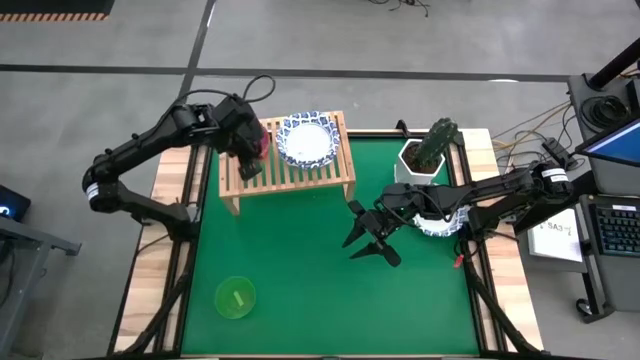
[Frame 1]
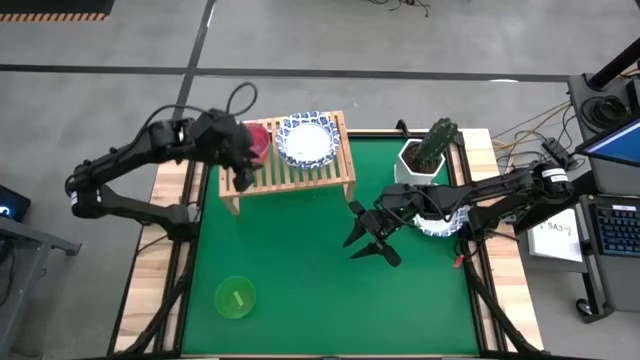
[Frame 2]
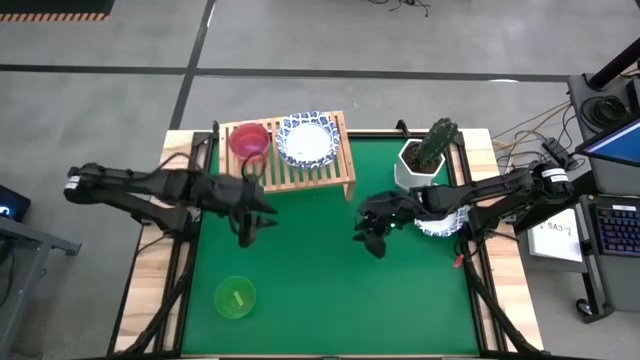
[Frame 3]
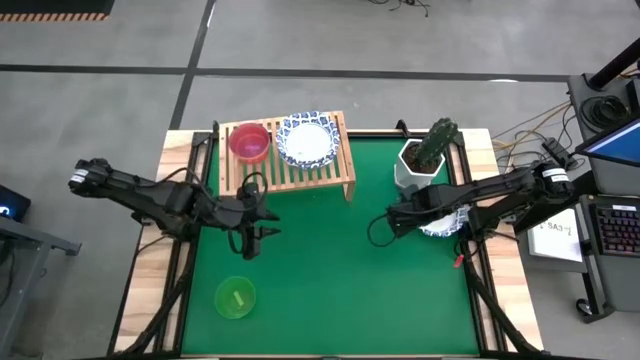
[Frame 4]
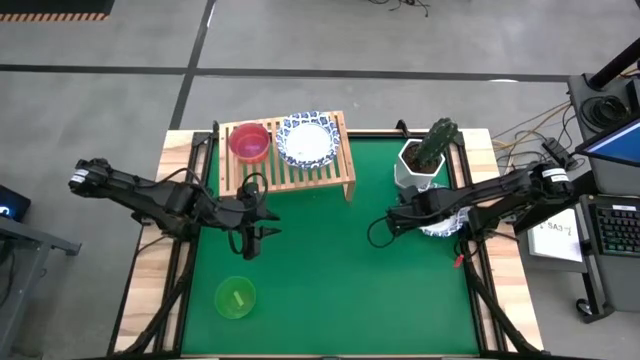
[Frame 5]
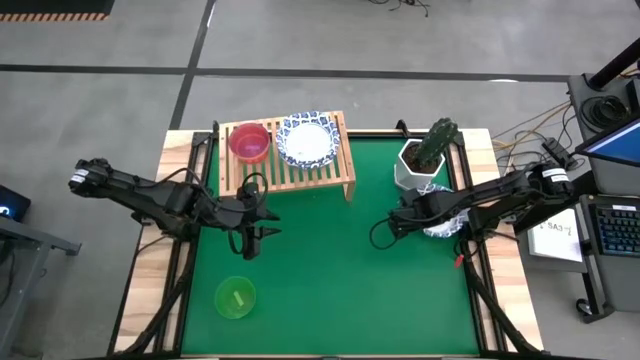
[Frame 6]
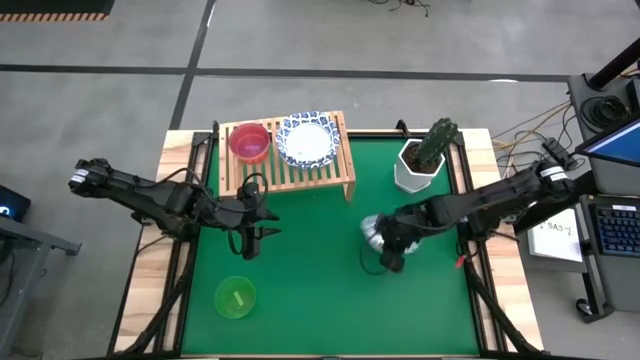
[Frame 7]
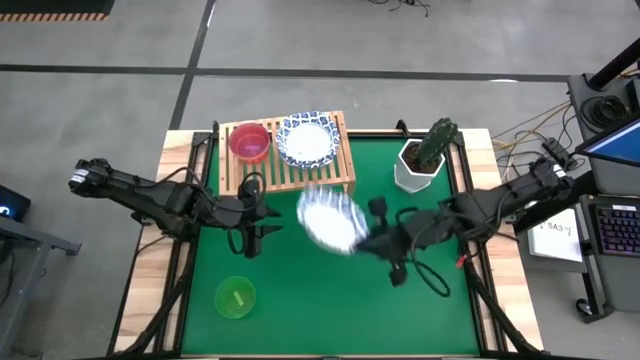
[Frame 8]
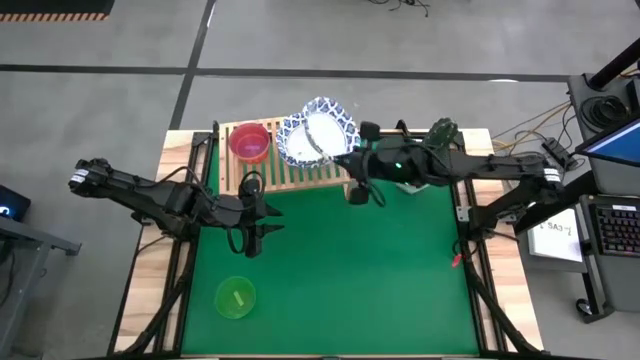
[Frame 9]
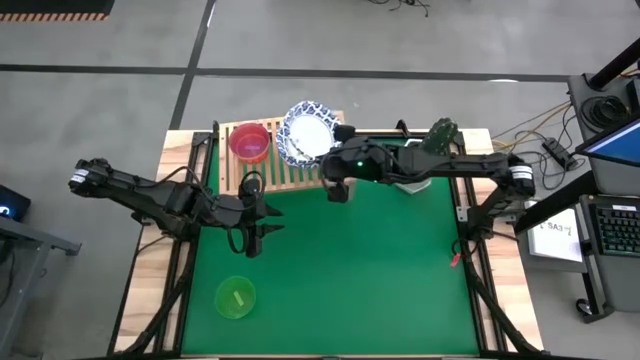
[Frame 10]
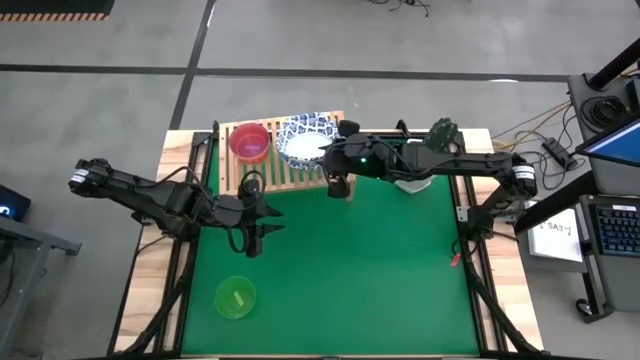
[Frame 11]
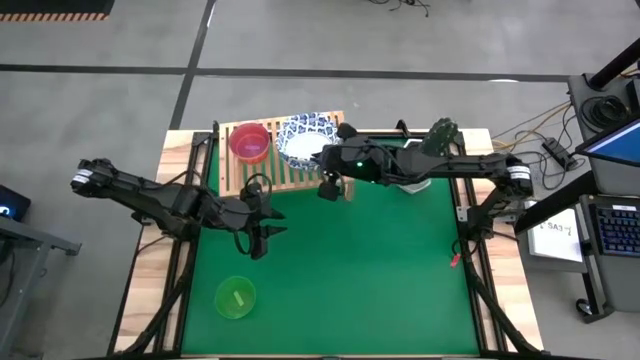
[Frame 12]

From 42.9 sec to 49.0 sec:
Task: Place and stack bowls onto a shelf
Stack the white blue bowl on top of the white blue bowl on the shelf

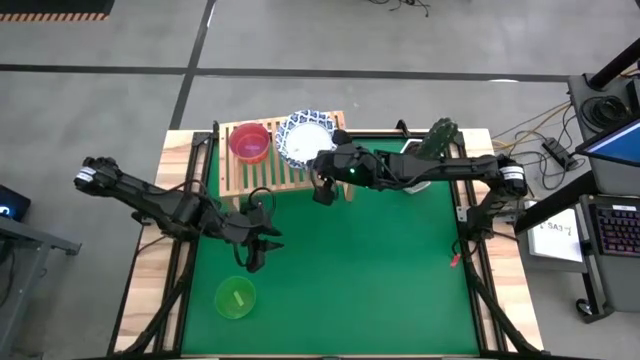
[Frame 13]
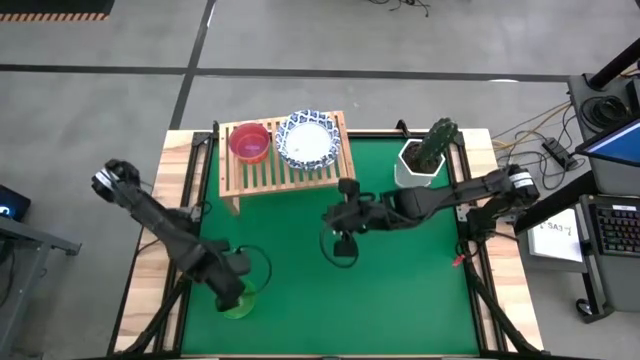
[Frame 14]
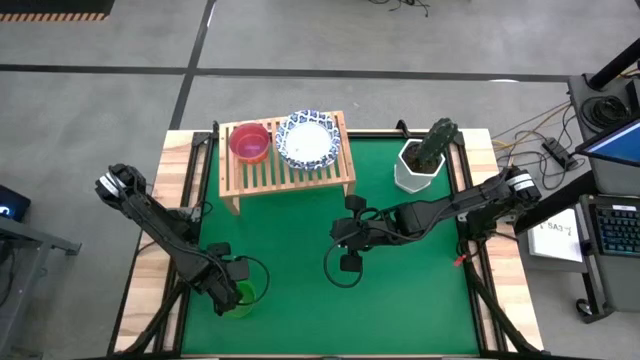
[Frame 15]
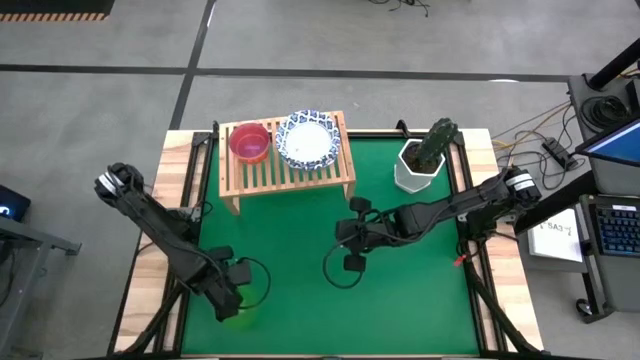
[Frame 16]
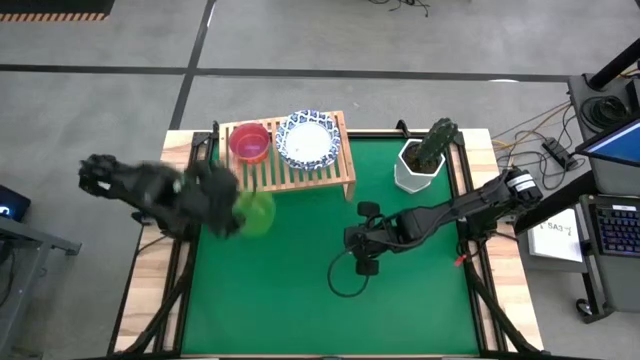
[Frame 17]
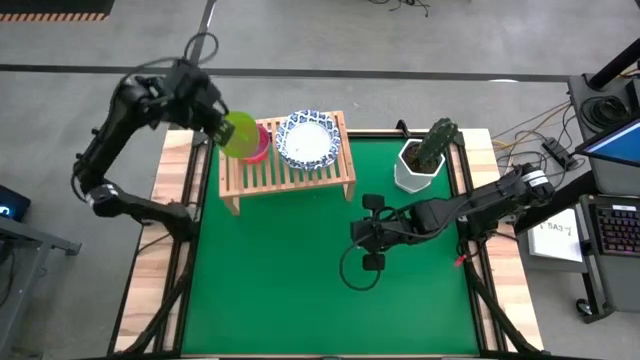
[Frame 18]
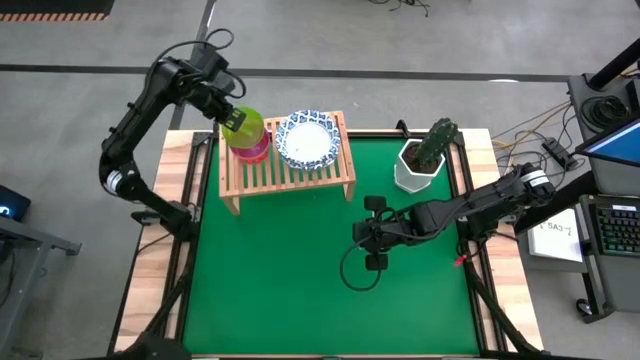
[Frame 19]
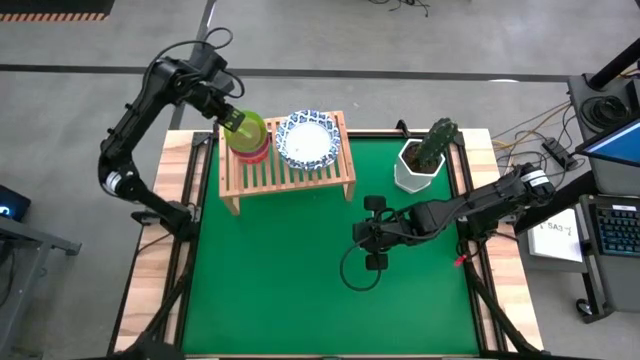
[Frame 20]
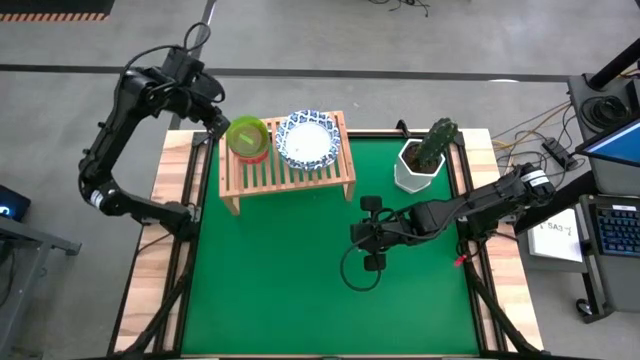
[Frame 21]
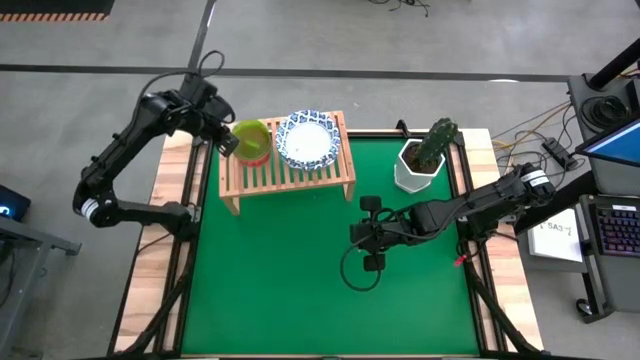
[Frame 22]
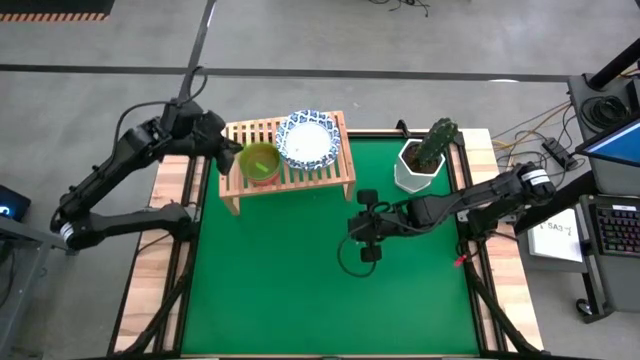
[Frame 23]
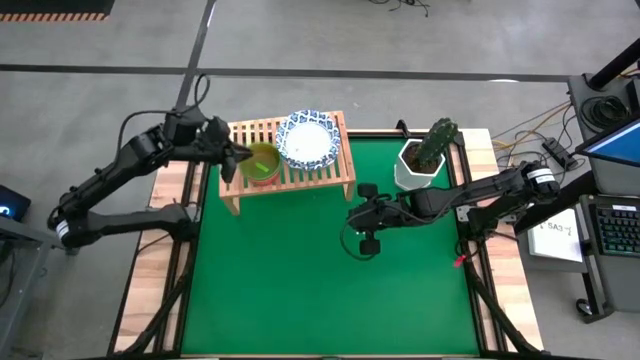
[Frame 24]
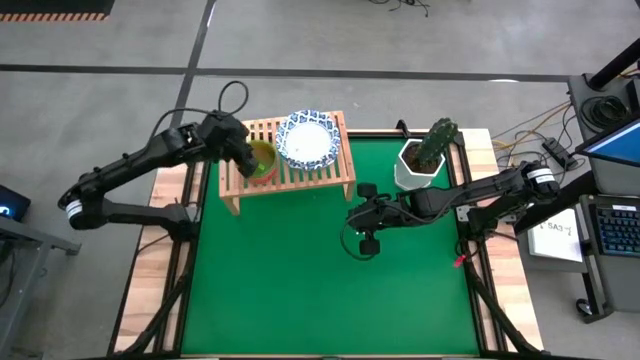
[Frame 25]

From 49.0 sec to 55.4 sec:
Stack the green bowl on top of the purple bowl on the shelf

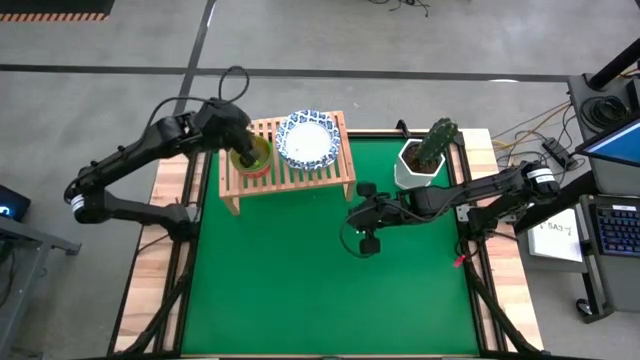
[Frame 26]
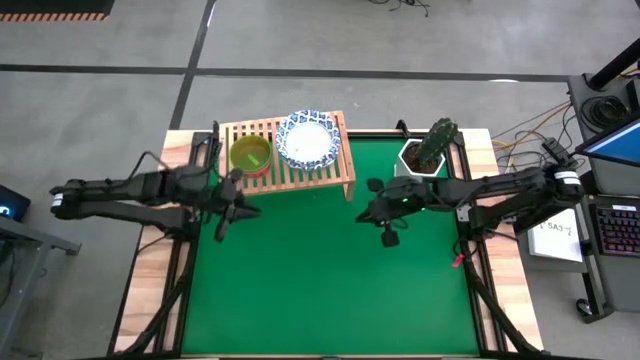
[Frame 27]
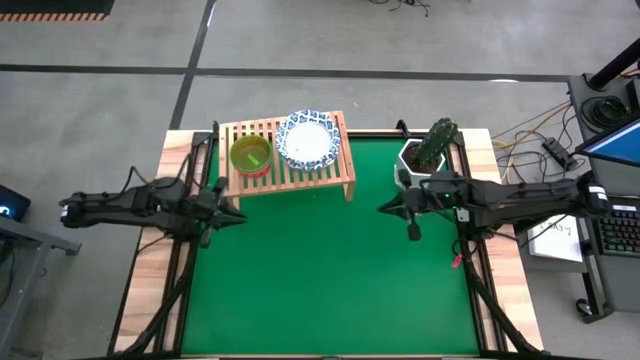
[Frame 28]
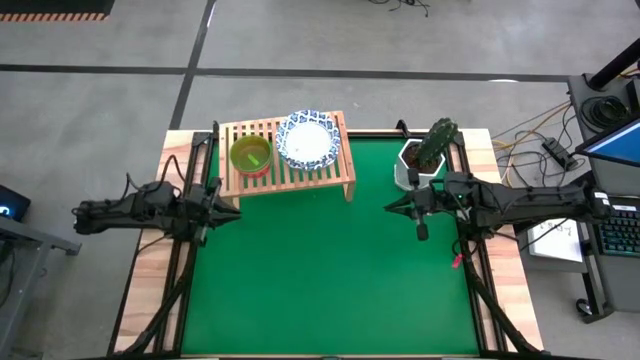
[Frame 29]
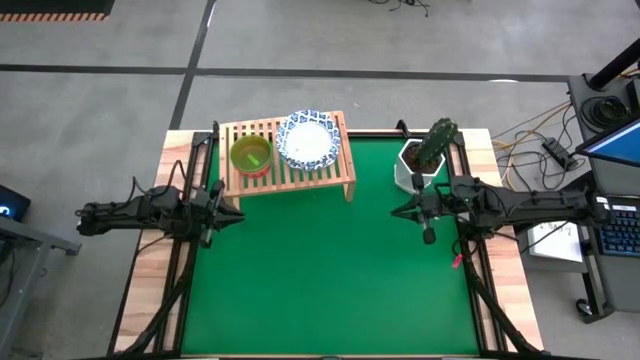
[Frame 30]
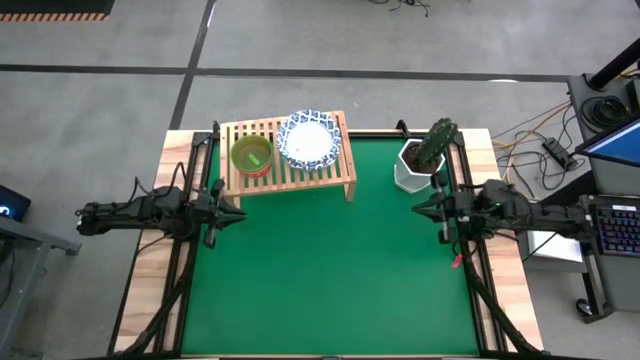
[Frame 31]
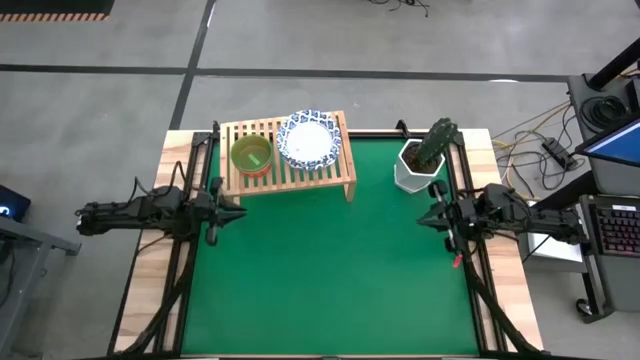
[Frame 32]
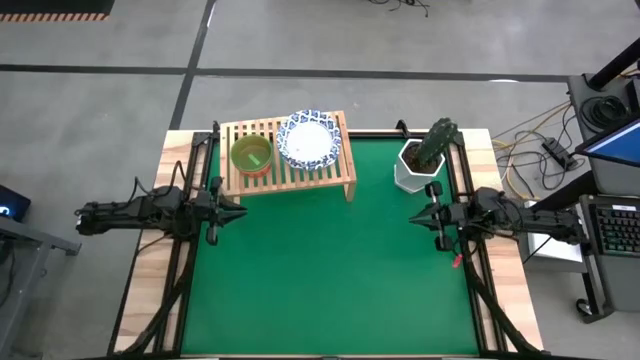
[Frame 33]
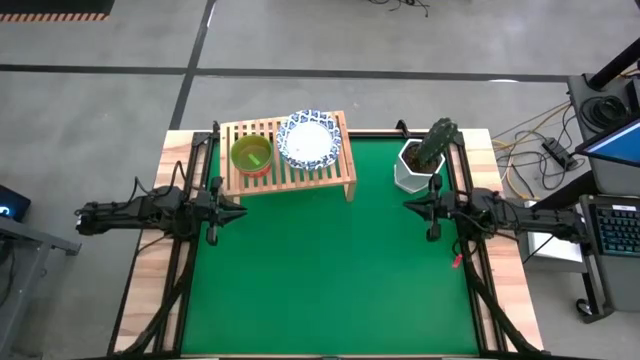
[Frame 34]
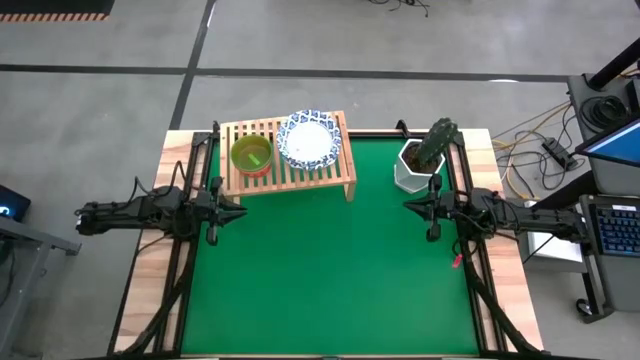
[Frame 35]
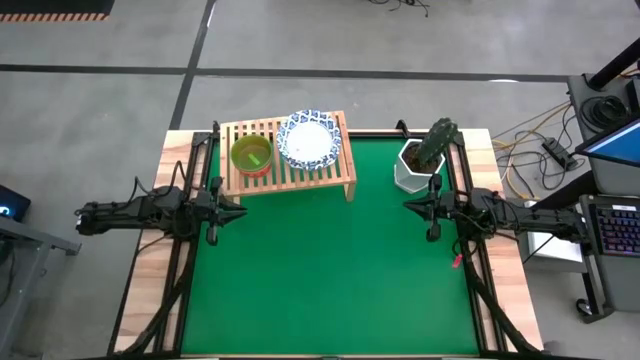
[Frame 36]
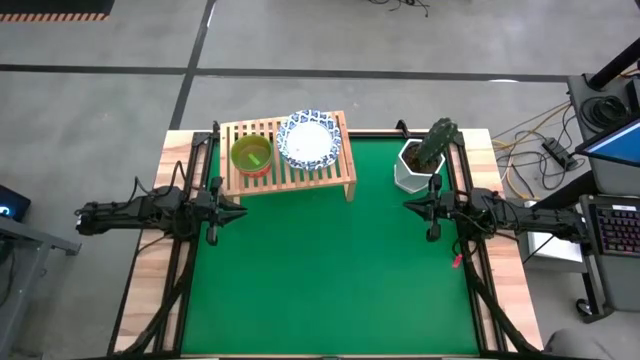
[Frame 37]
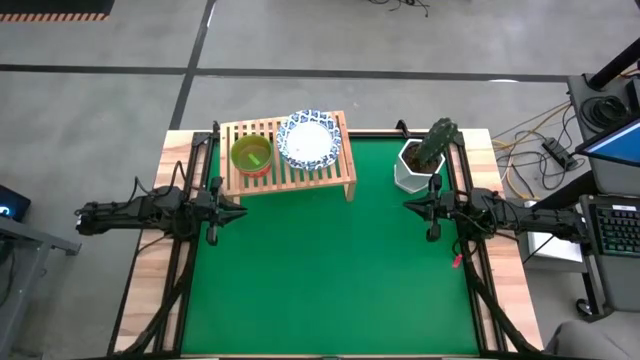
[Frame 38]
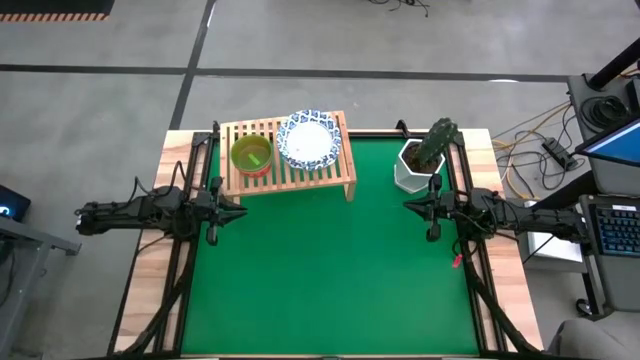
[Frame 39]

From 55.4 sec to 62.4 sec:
Return to Home Position

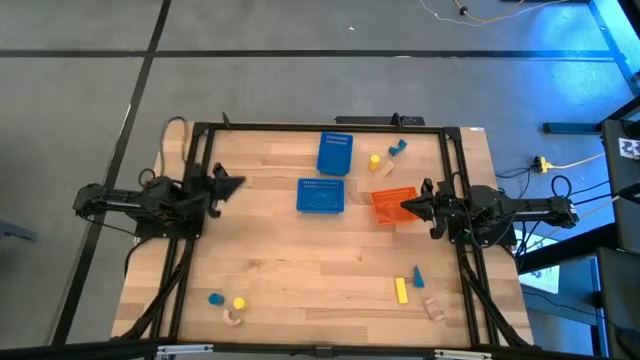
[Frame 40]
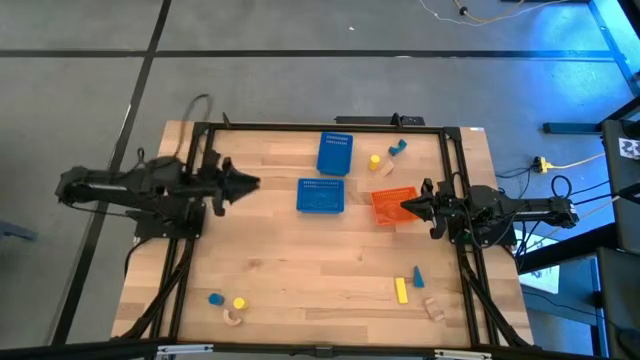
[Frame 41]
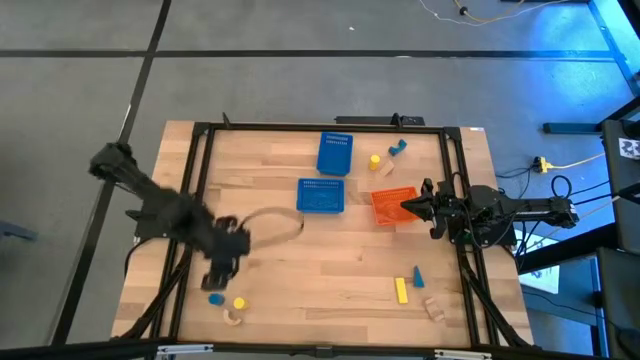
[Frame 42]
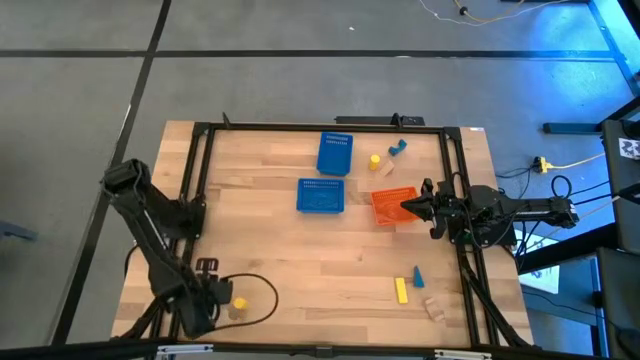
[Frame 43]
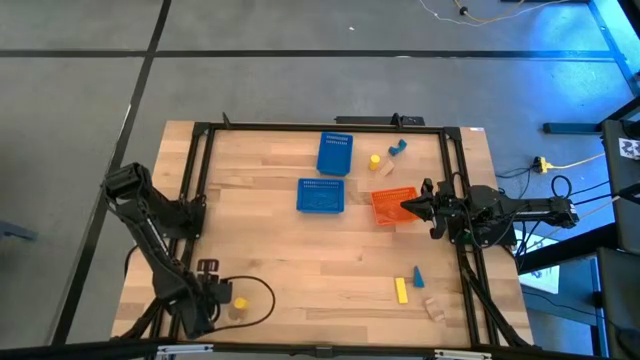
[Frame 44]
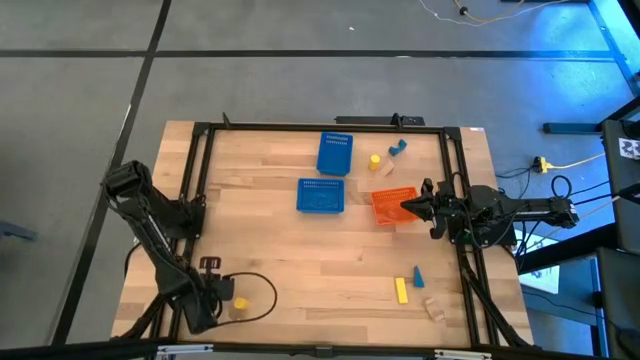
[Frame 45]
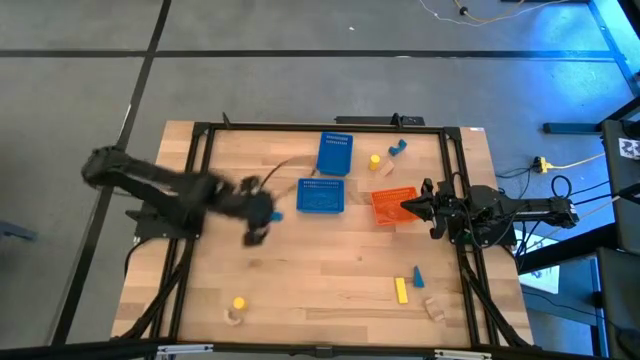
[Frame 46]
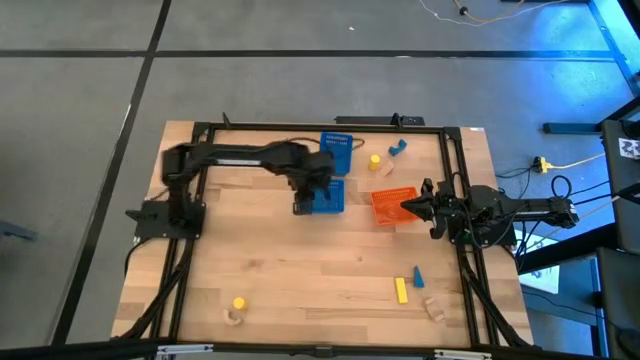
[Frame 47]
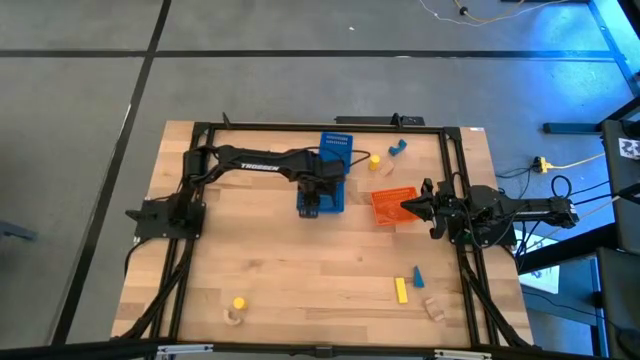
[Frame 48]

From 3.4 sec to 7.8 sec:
Task: Sort & place blocks by color
Put the bottom left blue block into the bottom blue basket
